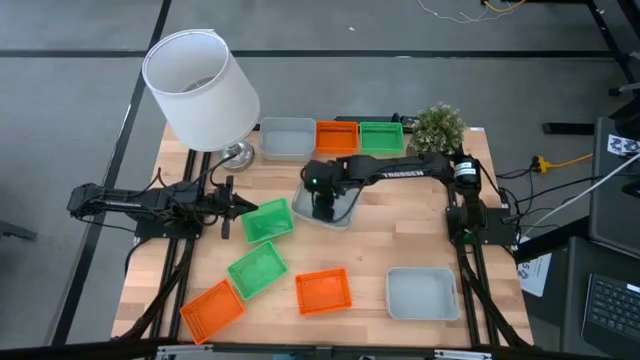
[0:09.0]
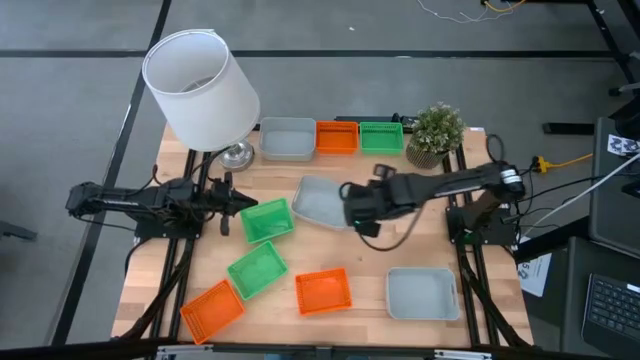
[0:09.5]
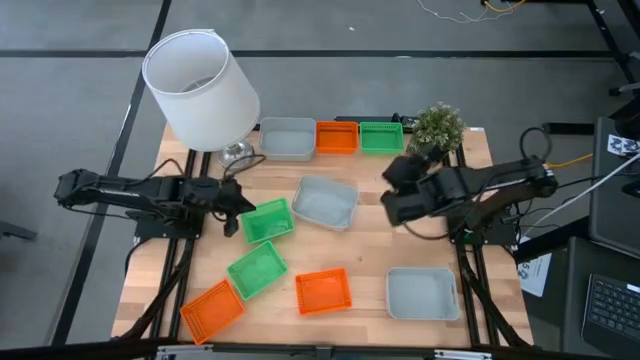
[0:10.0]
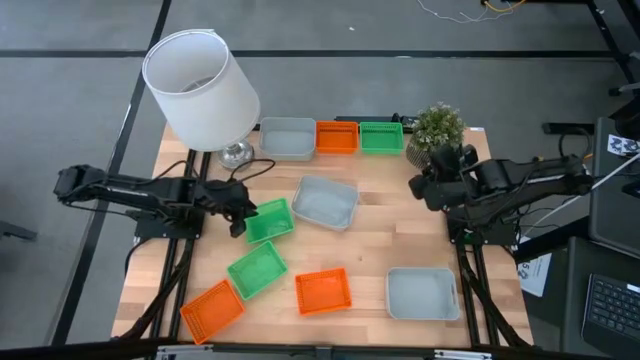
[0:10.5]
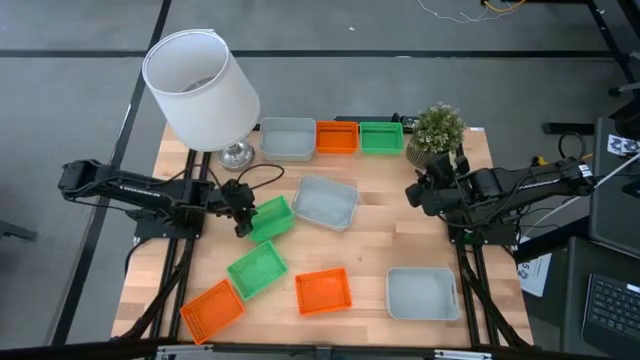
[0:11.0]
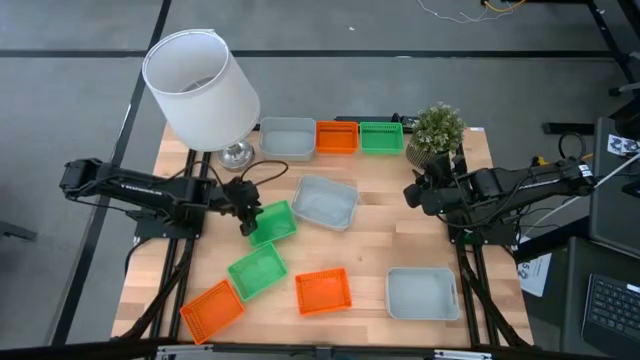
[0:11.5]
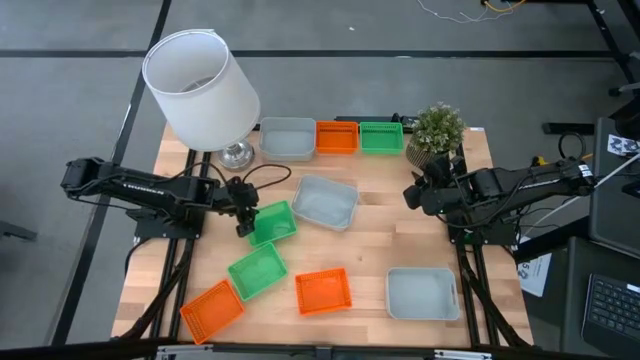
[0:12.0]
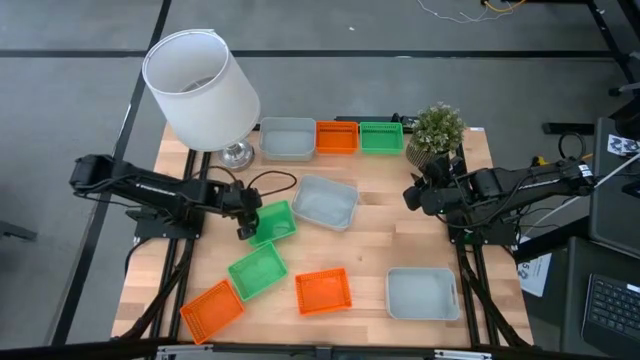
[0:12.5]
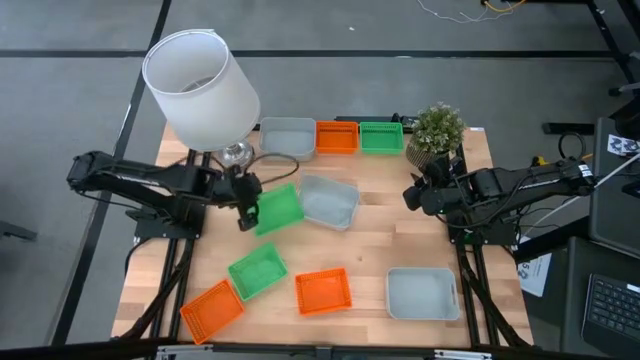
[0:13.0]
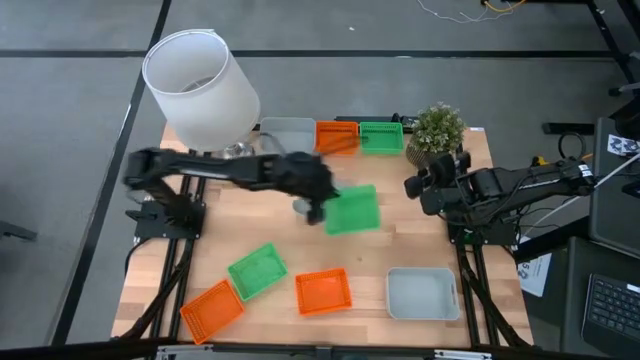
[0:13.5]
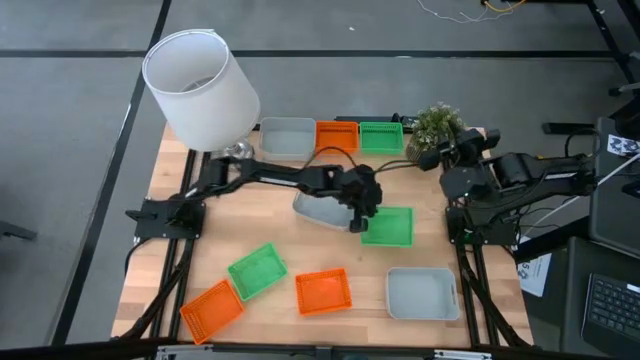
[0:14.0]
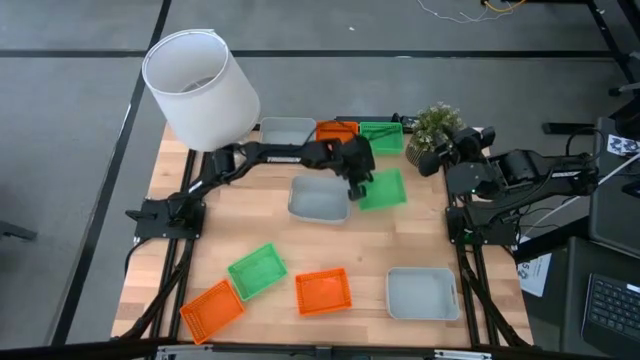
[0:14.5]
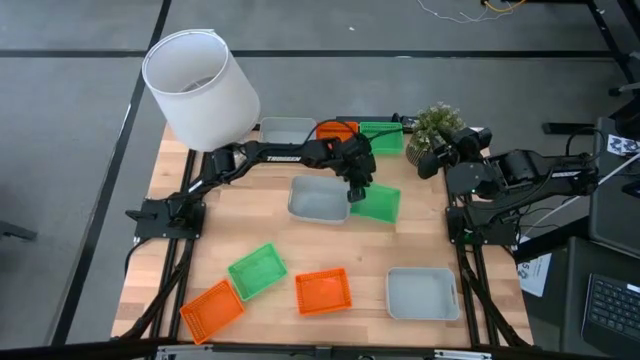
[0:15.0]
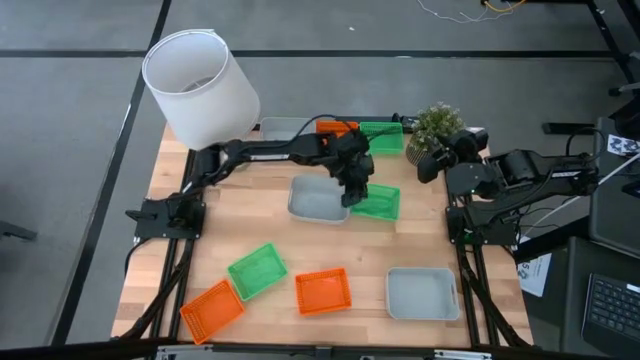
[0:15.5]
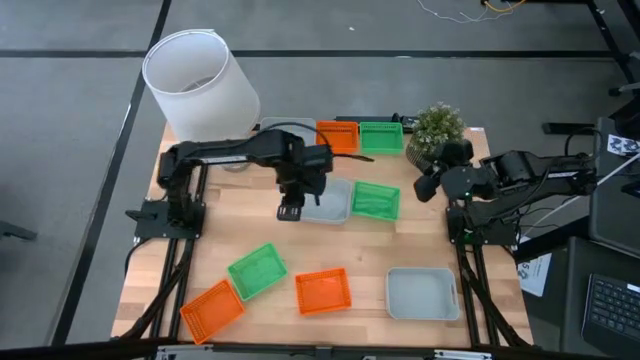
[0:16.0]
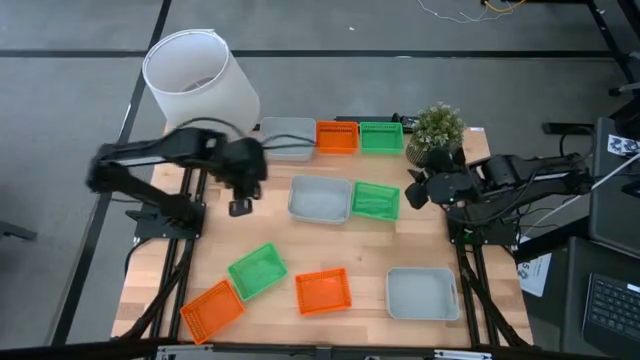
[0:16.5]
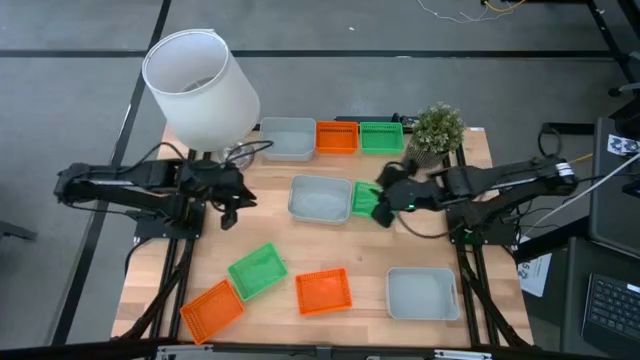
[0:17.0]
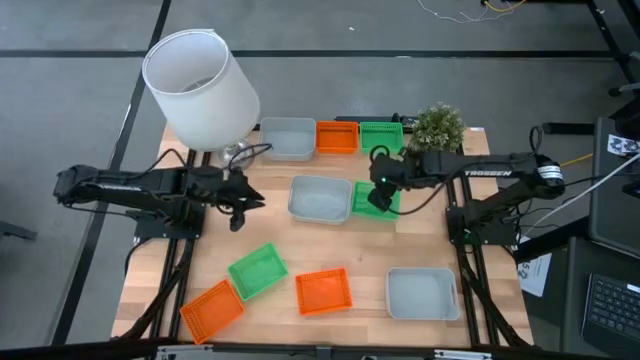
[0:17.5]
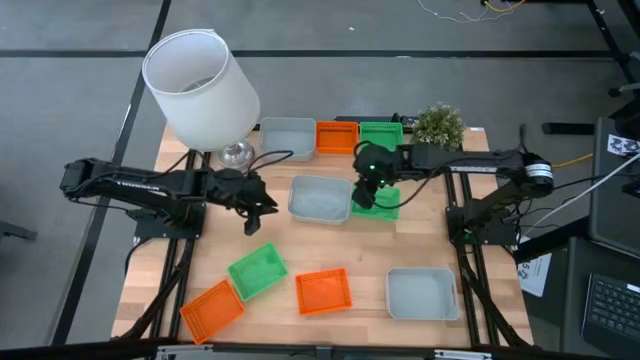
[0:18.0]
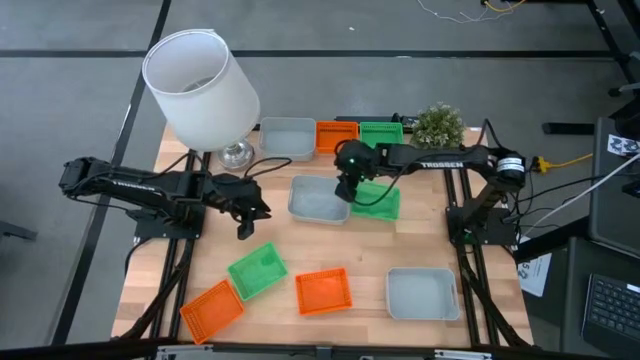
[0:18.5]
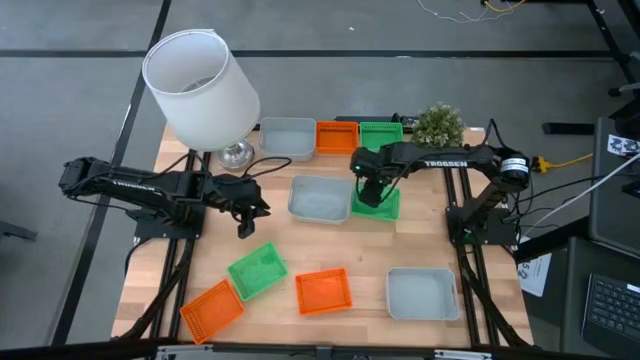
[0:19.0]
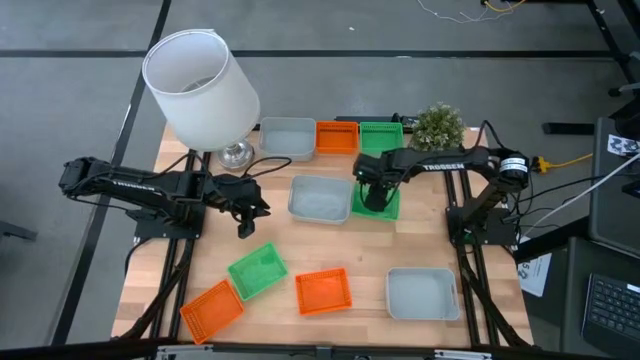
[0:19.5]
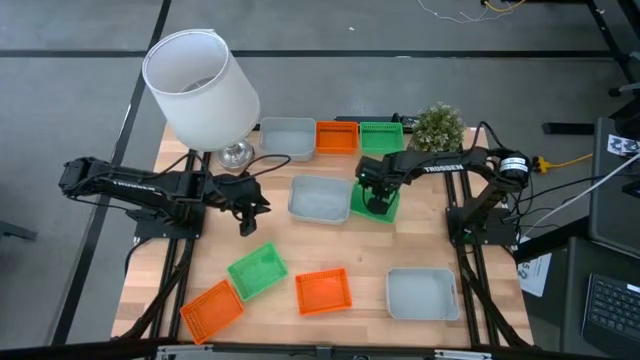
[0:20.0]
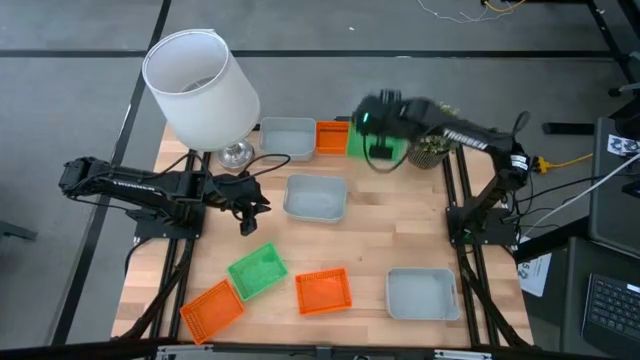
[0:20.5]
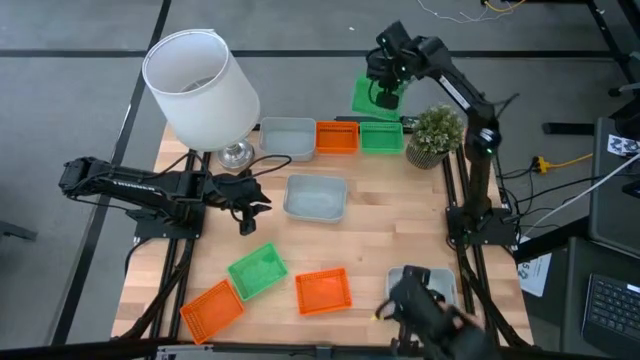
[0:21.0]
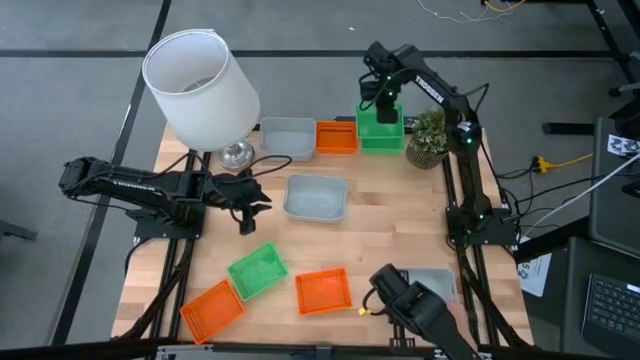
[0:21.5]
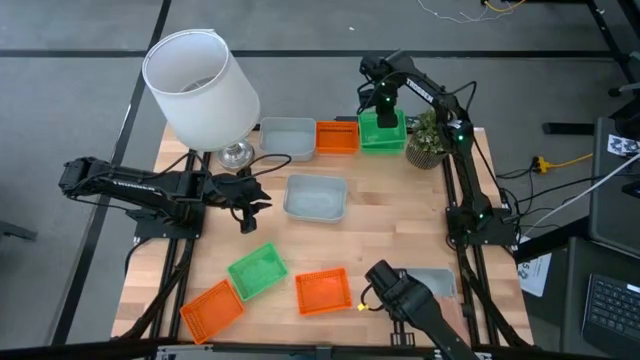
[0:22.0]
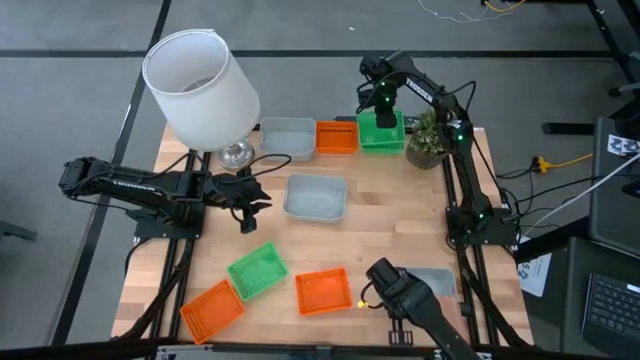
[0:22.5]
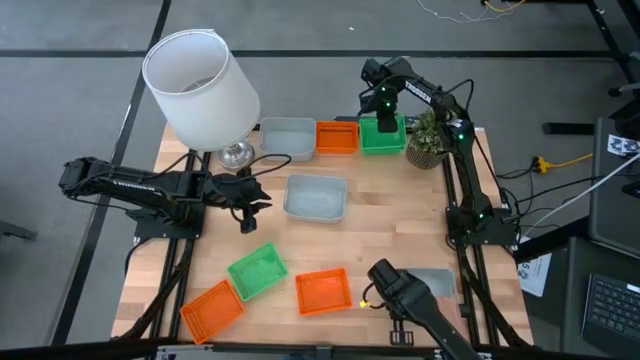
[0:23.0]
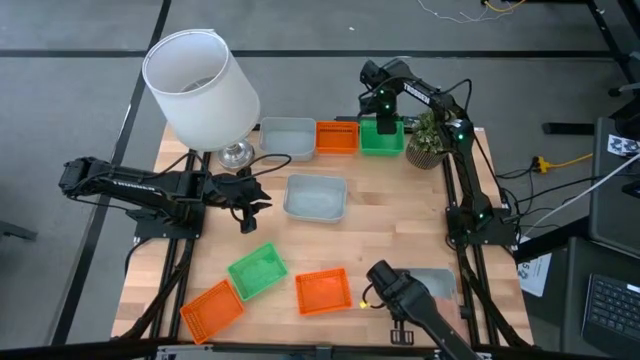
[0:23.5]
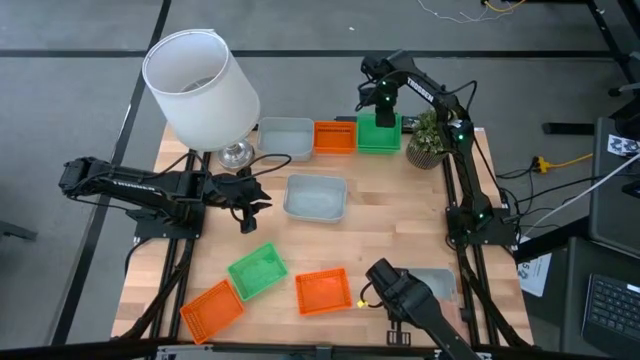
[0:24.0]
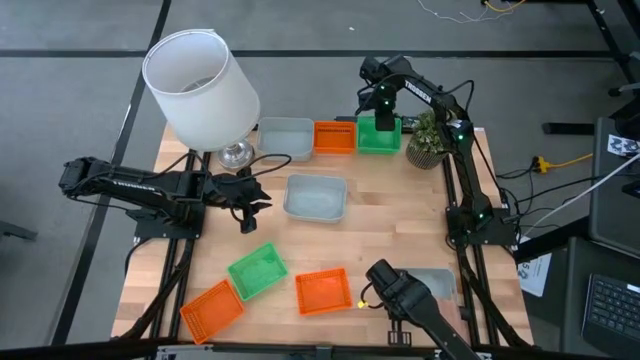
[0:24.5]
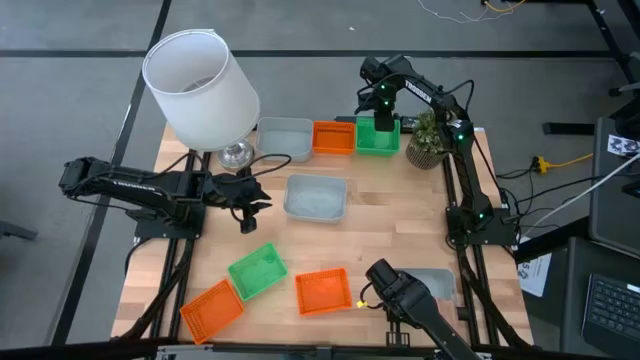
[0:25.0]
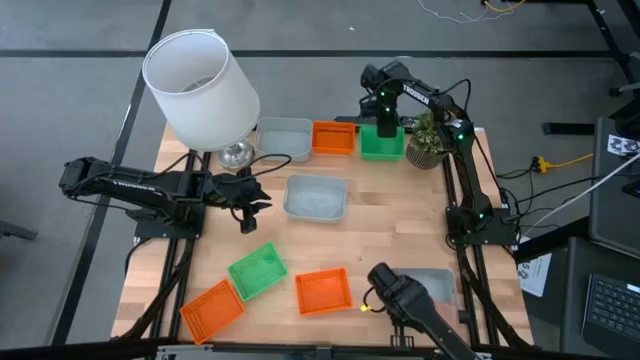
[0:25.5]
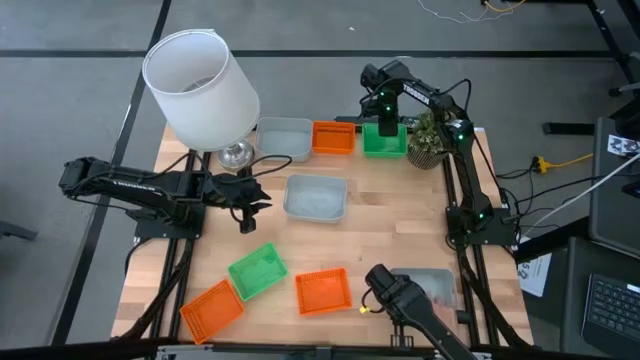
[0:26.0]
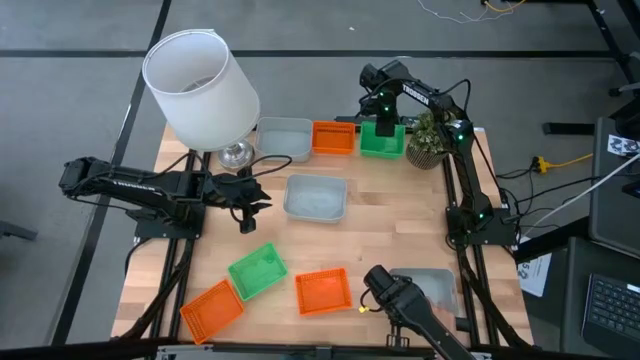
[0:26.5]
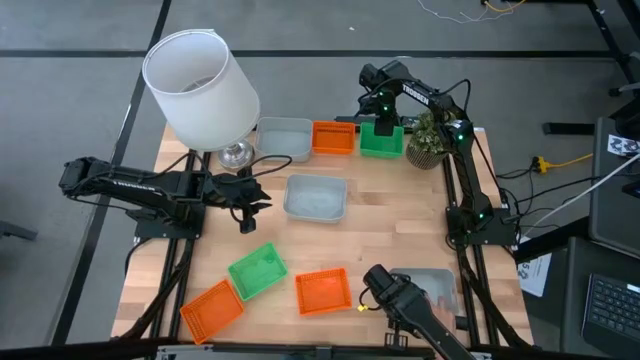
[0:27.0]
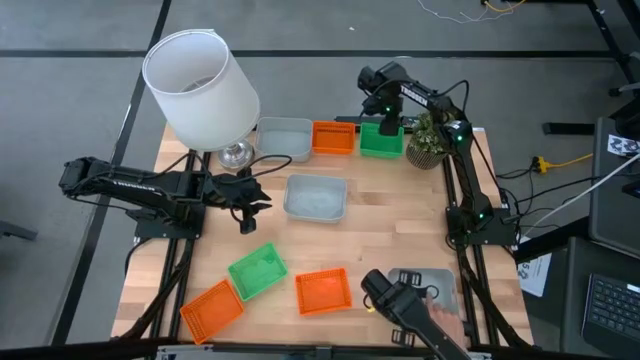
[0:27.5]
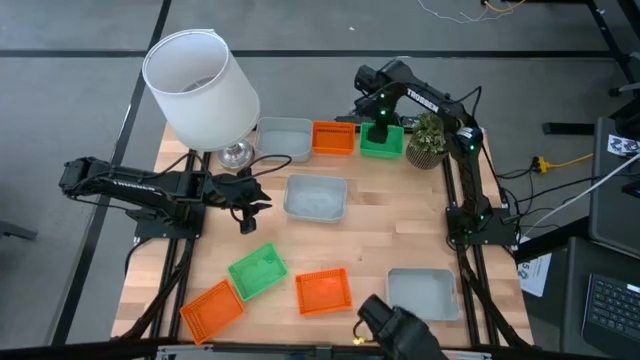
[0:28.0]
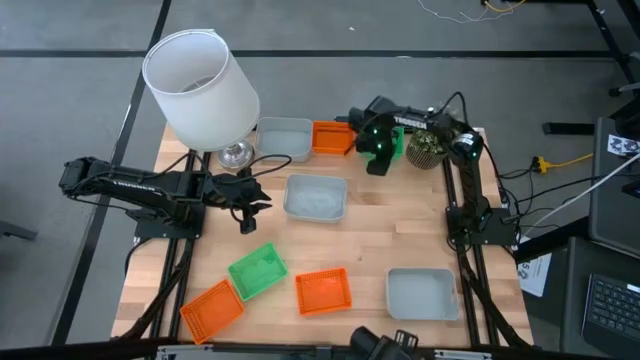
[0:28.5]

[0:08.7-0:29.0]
Stack the middle green bin on top of the top green bin
